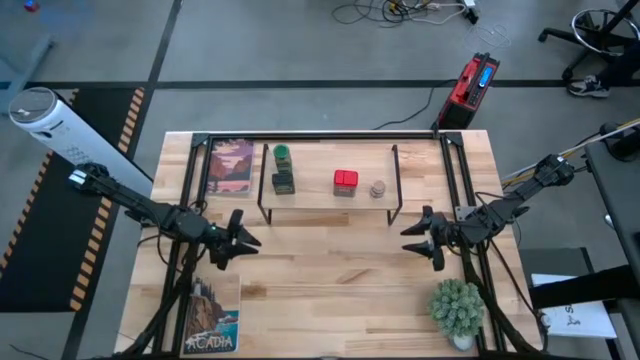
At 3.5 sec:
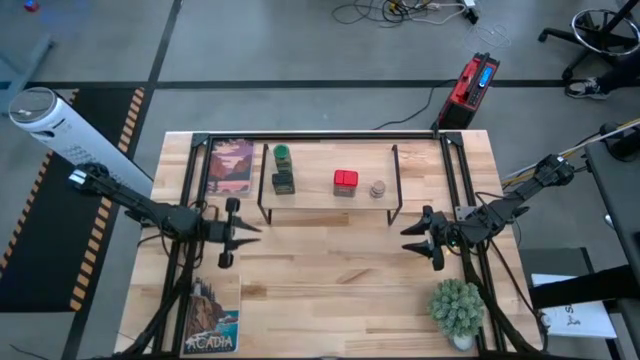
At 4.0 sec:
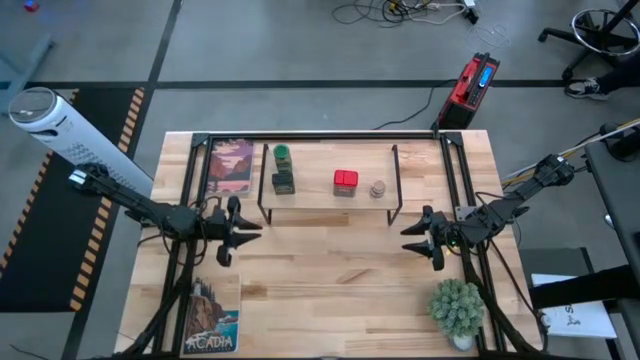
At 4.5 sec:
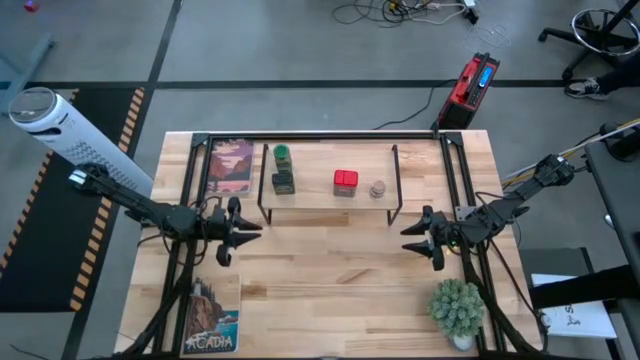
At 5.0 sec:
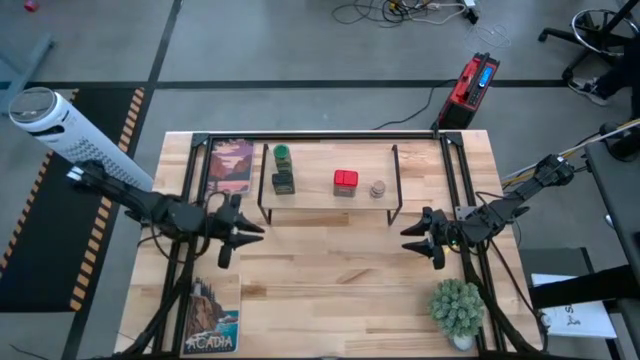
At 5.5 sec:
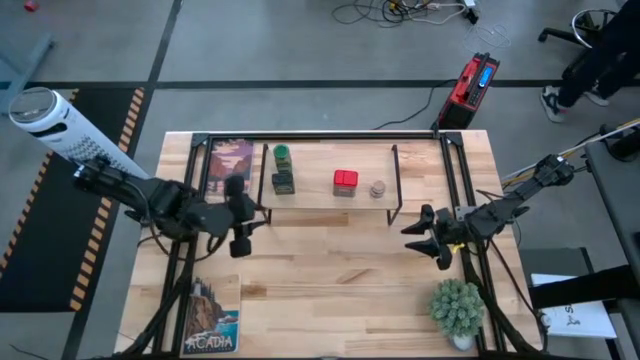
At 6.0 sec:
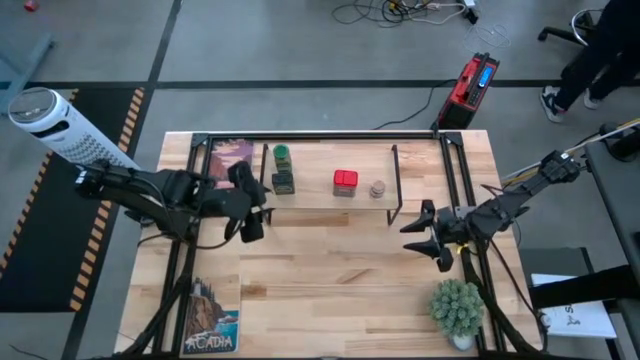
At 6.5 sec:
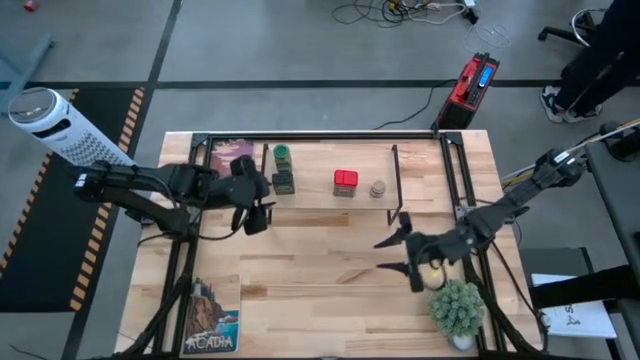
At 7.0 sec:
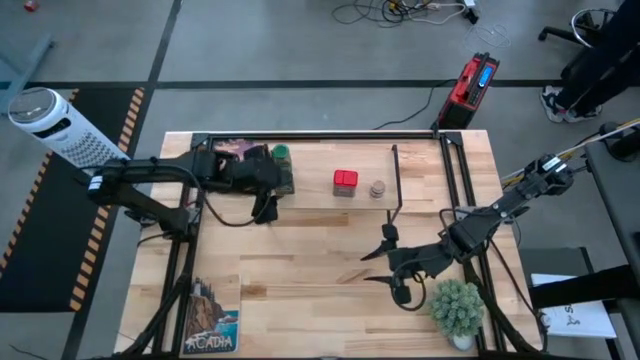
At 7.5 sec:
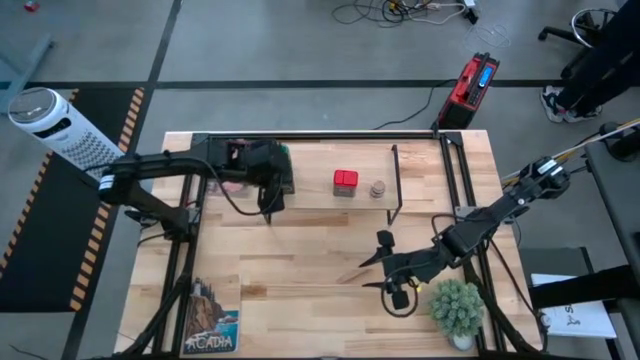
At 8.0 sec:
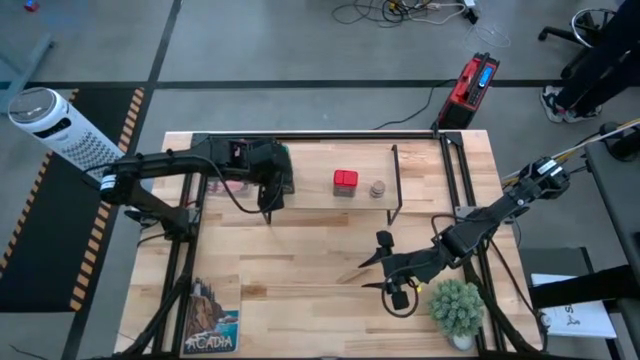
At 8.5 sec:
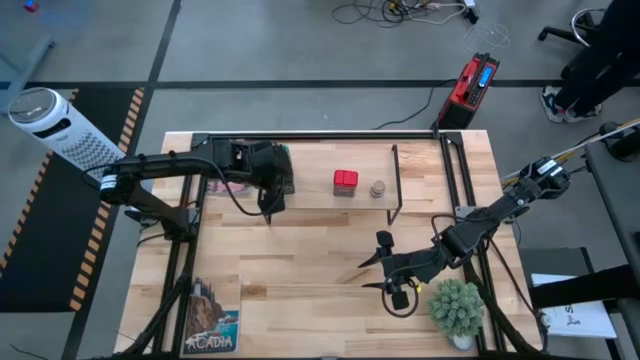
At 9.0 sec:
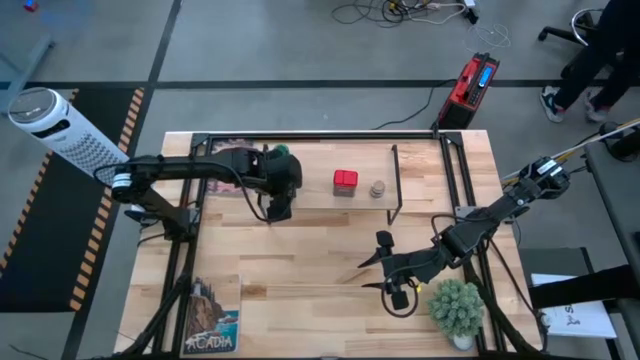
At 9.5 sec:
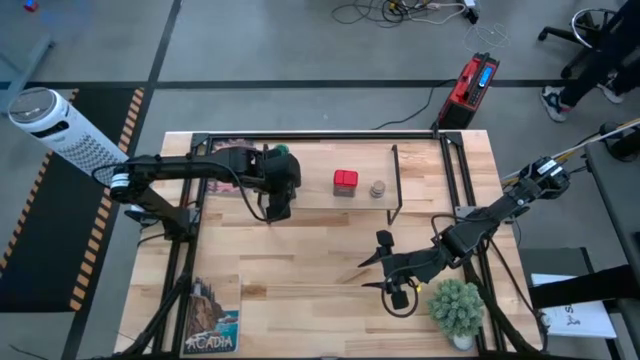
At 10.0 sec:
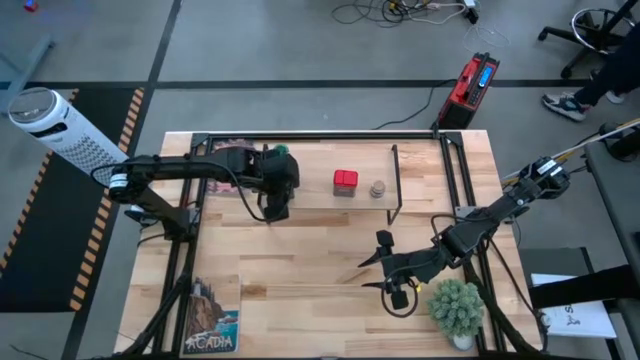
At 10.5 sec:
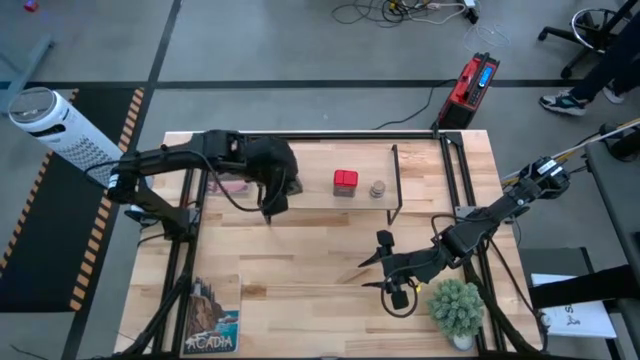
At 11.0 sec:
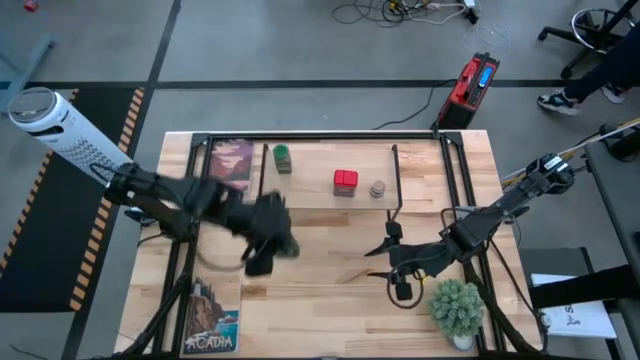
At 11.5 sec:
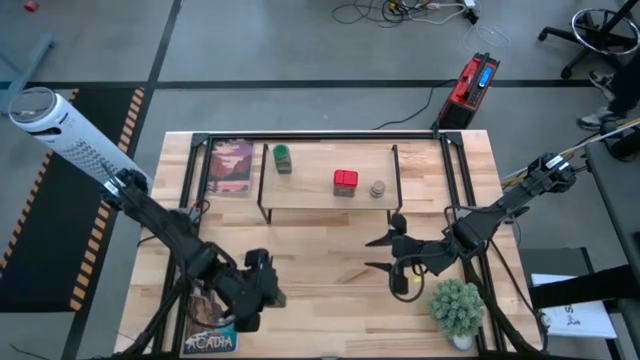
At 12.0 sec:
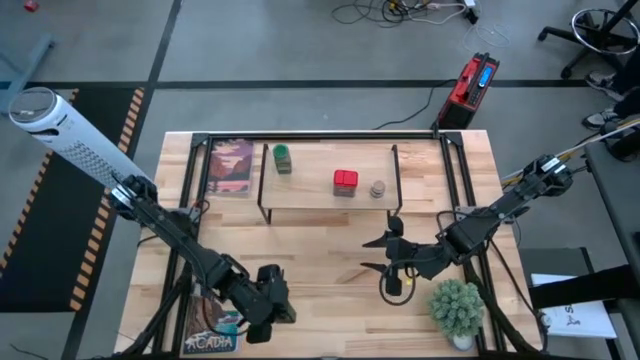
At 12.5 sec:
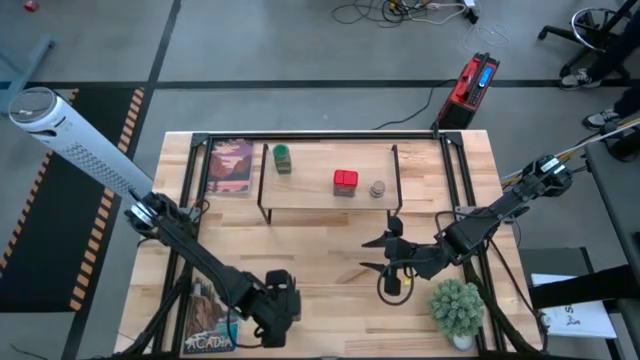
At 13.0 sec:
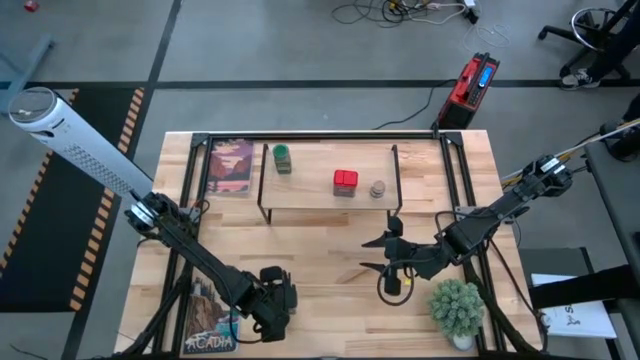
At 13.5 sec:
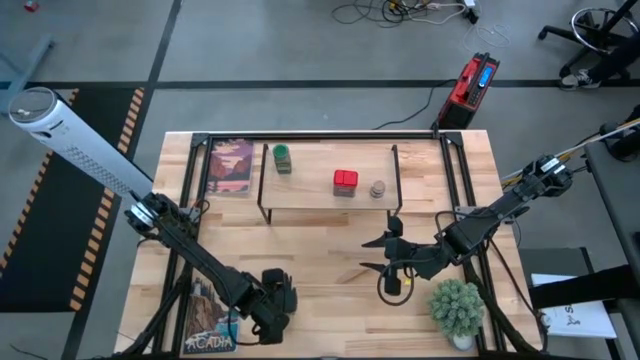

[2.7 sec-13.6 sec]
Task: Shelf spices
Remove the black seasoning can from the shelf

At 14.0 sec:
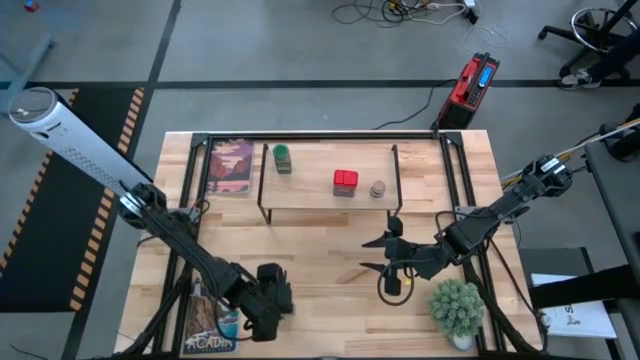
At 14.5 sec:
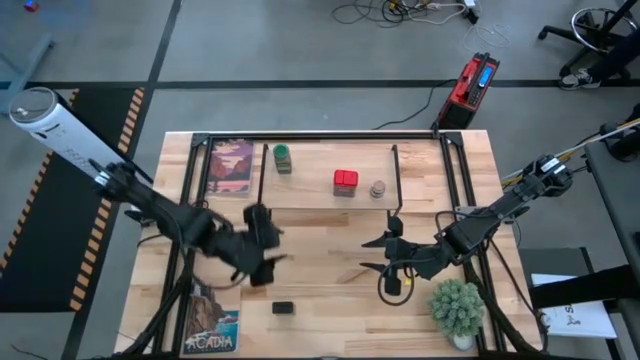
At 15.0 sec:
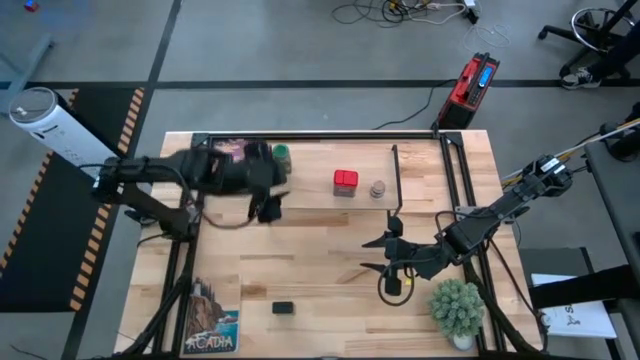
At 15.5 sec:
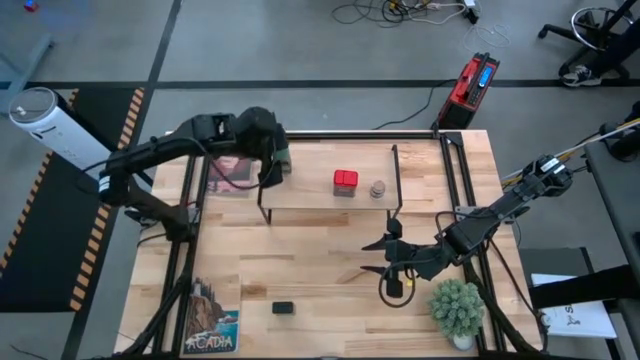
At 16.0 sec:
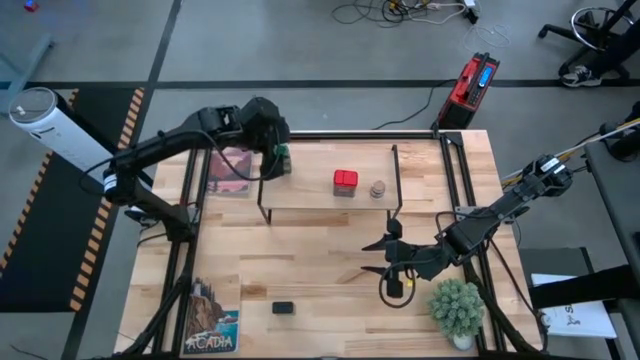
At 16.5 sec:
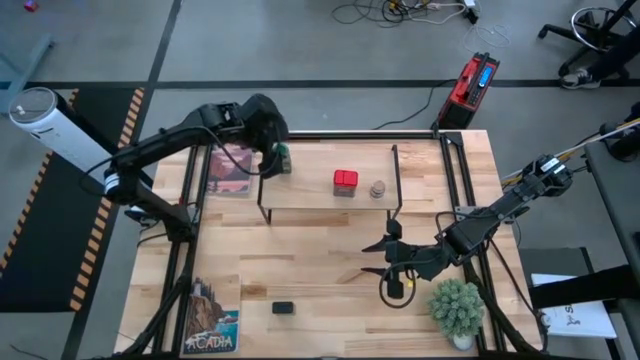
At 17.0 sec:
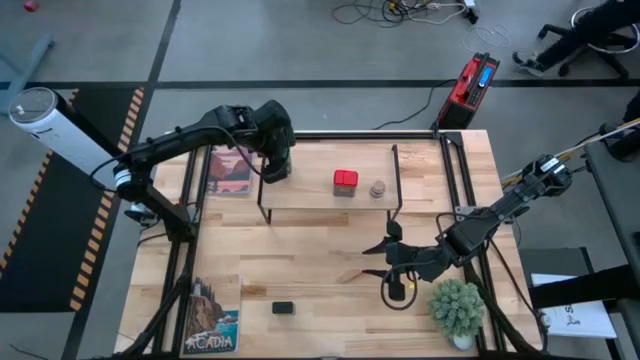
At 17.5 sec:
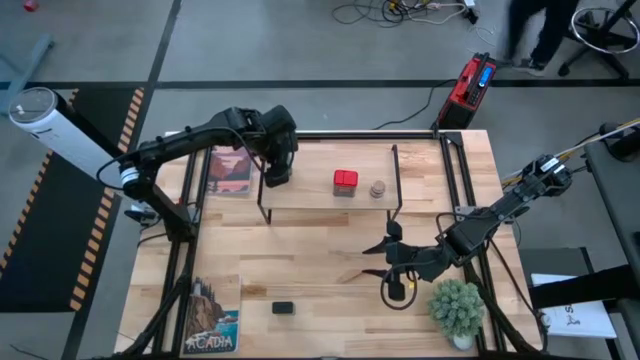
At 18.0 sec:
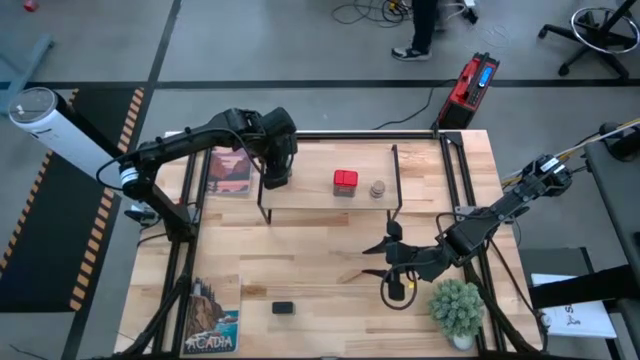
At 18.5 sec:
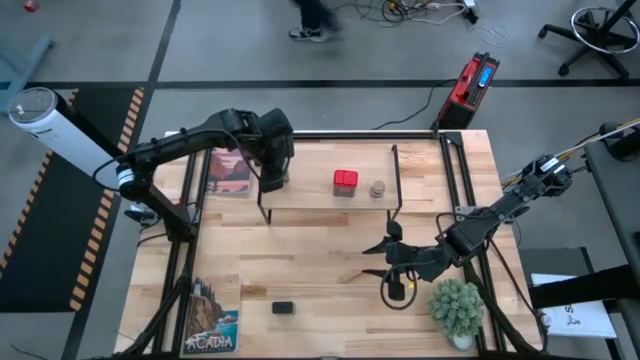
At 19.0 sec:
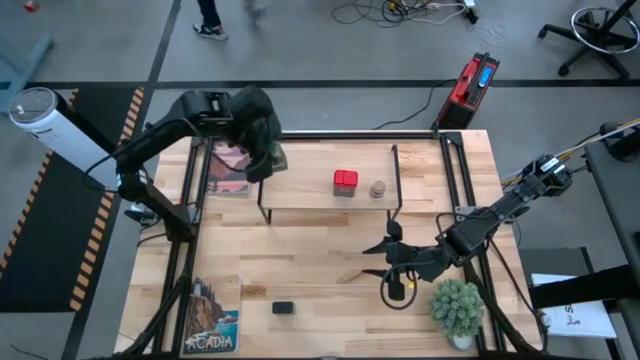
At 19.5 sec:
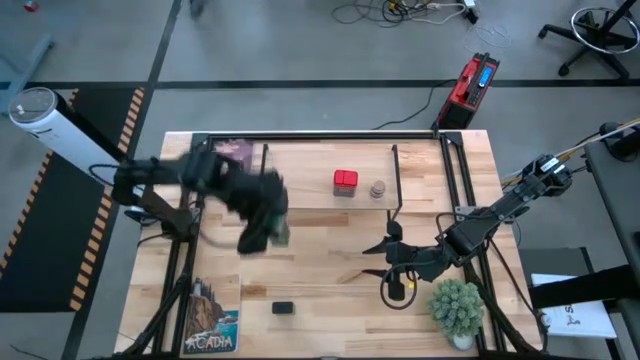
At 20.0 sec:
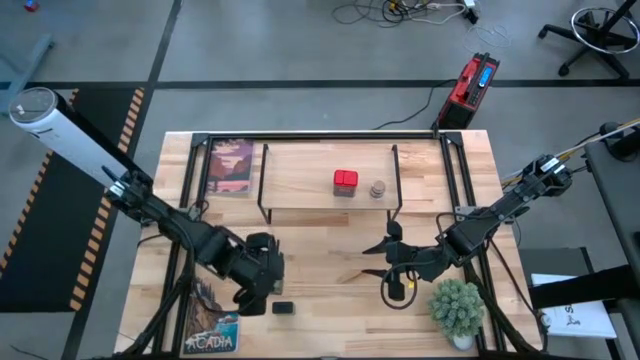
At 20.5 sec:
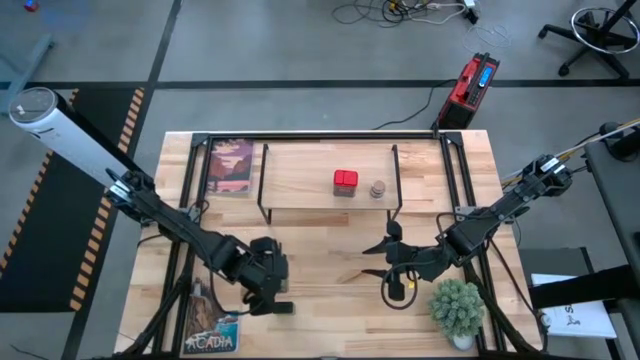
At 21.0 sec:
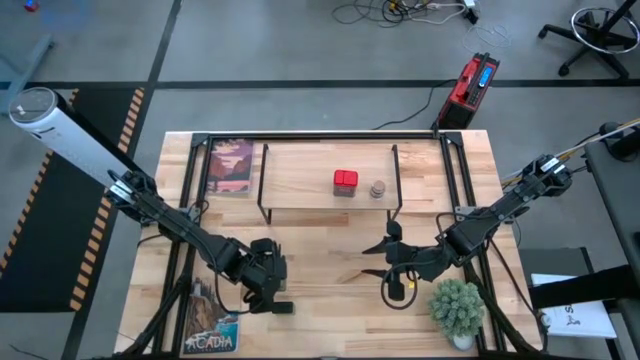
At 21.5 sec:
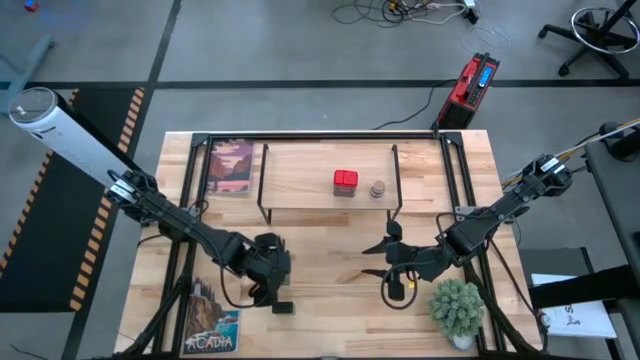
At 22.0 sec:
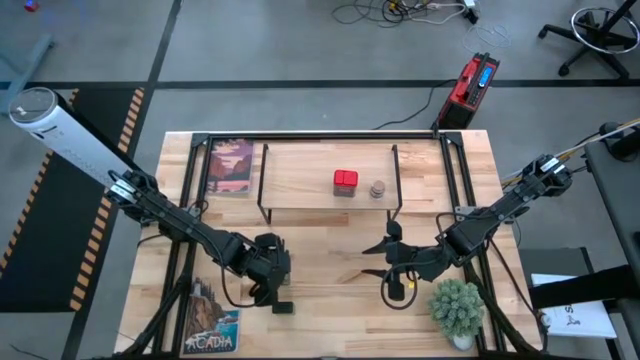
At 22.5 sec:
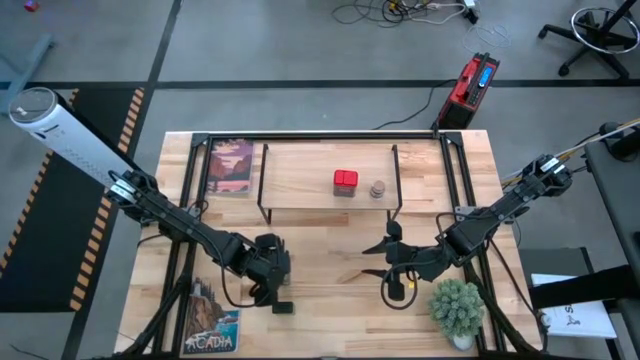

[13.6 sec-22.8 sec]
Remove the green seasoning bottle from the shelf

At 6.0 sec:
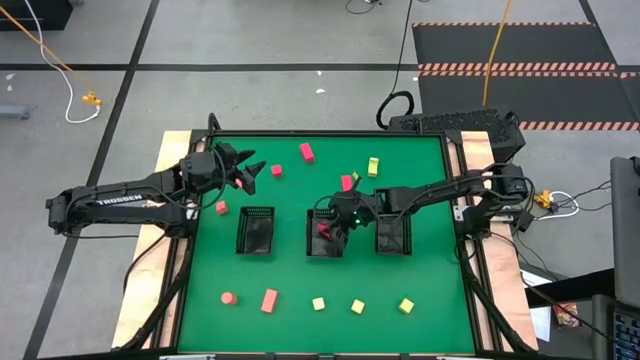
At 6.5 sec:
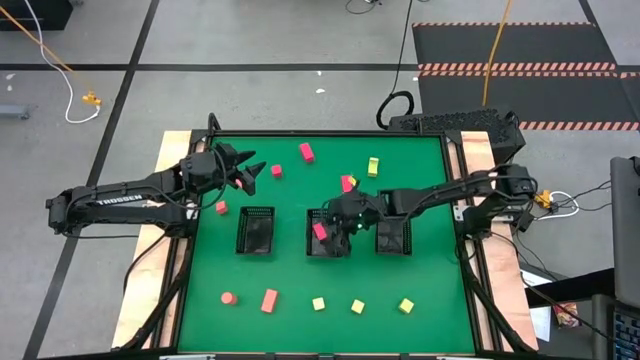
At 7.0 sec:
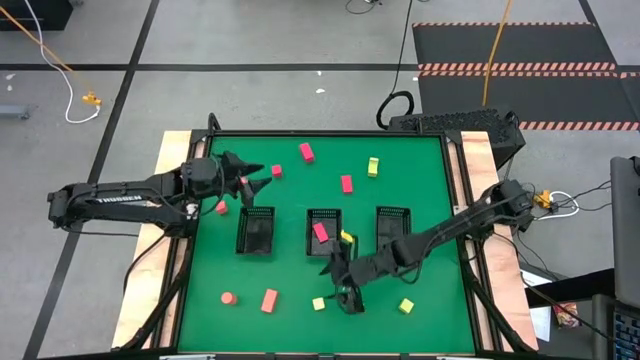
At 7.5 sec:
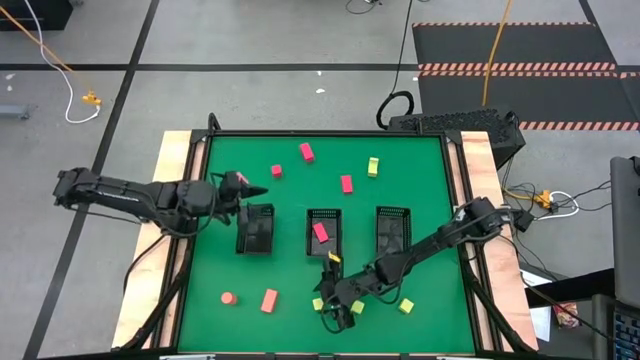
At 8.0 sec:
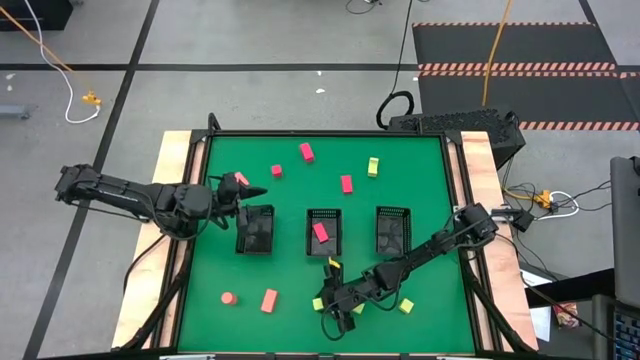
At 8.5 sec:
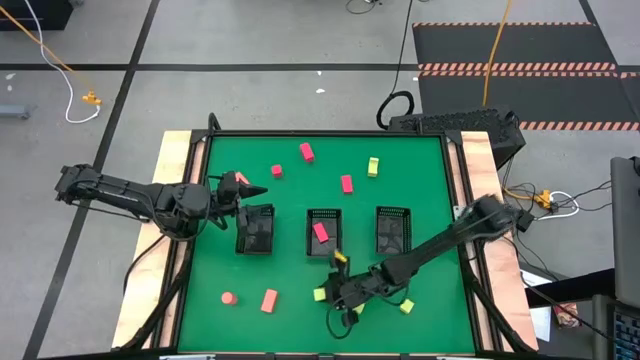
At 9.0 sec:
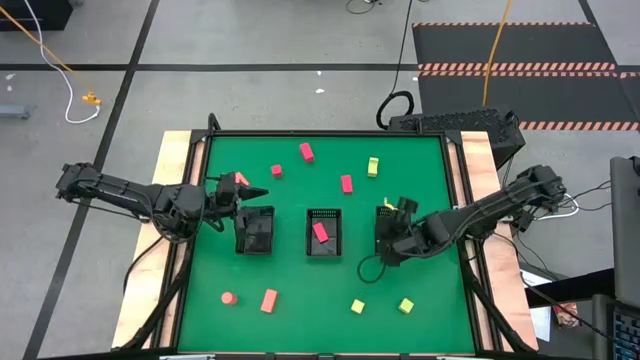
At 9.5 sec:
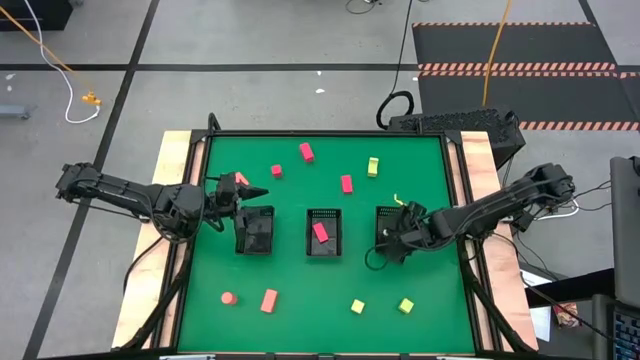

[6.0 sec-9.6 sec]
Task: Sort & place blocks by color
Put the green block into the right black basket
